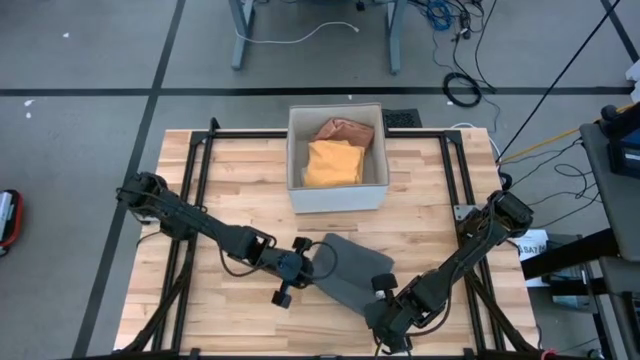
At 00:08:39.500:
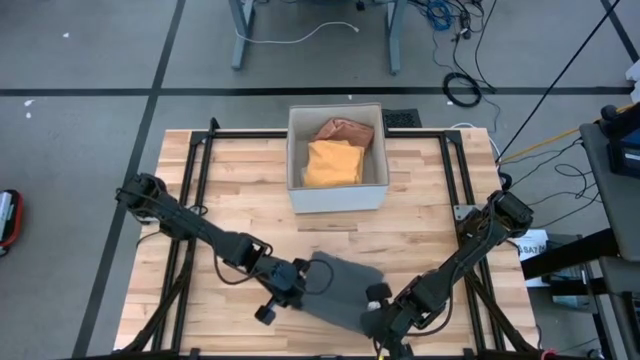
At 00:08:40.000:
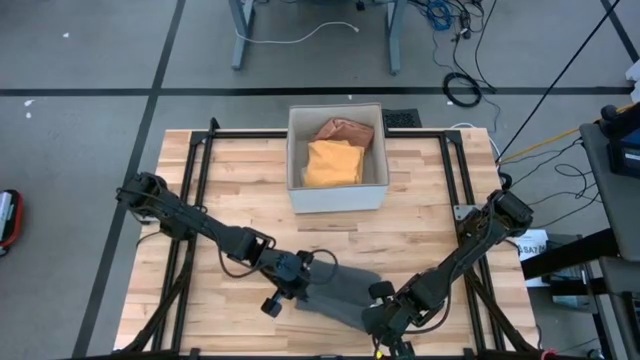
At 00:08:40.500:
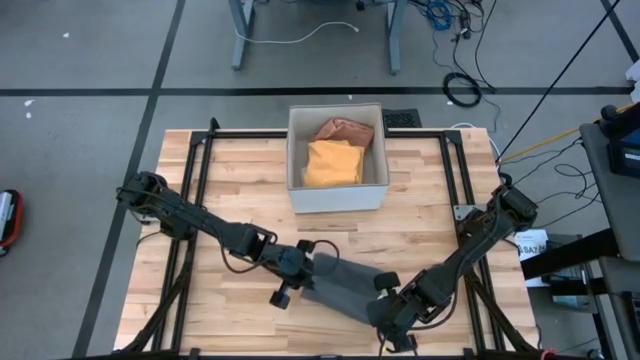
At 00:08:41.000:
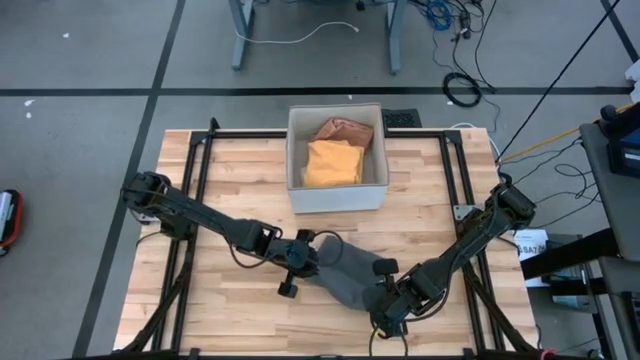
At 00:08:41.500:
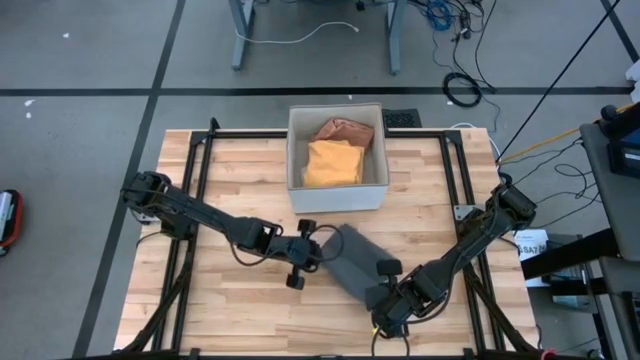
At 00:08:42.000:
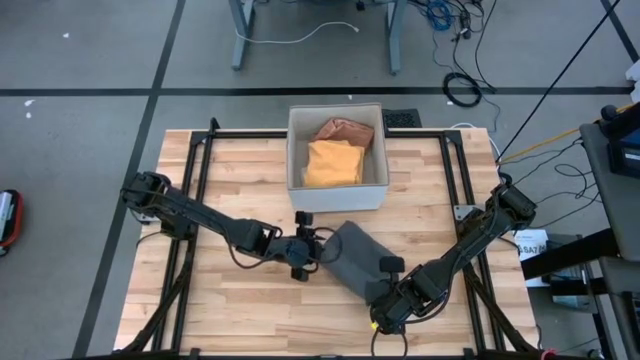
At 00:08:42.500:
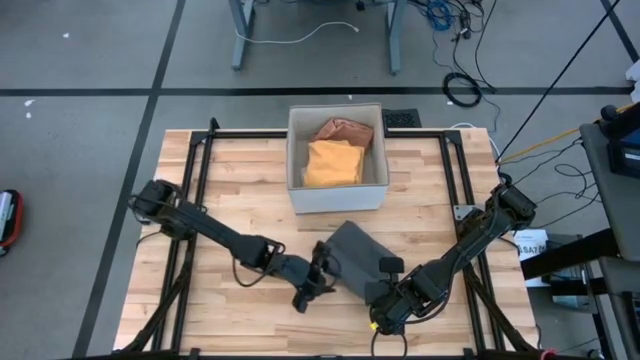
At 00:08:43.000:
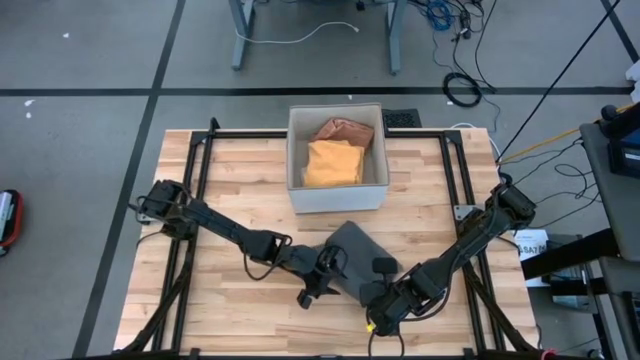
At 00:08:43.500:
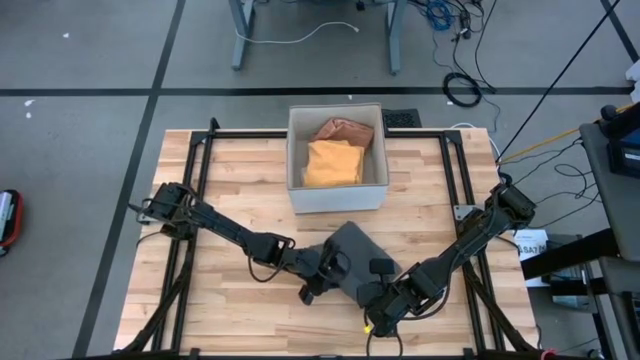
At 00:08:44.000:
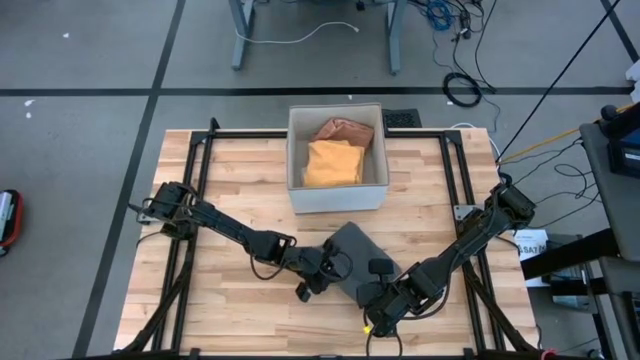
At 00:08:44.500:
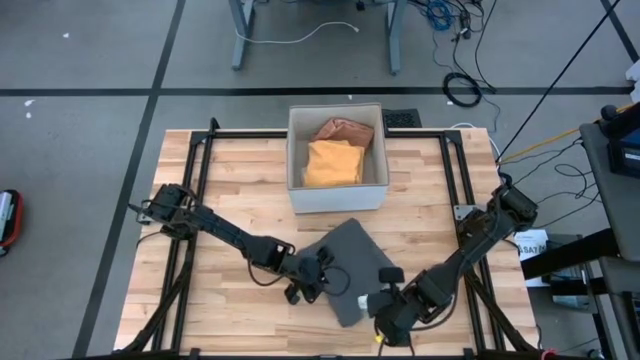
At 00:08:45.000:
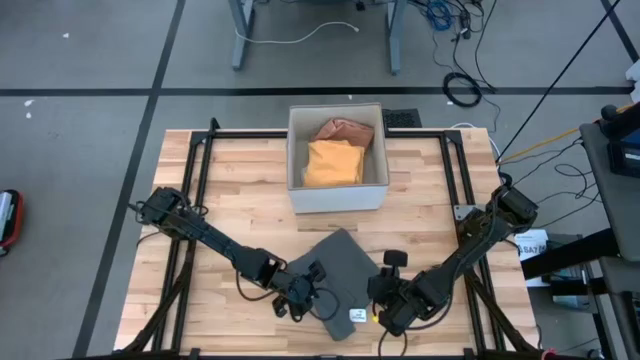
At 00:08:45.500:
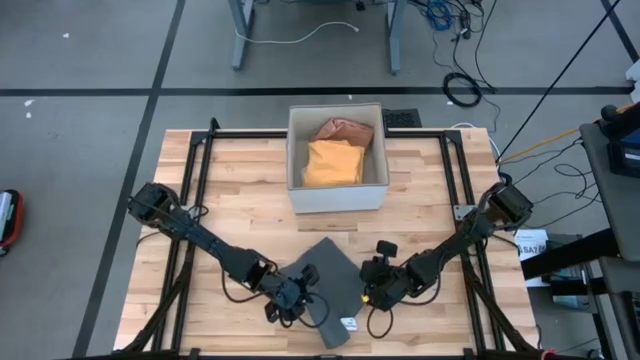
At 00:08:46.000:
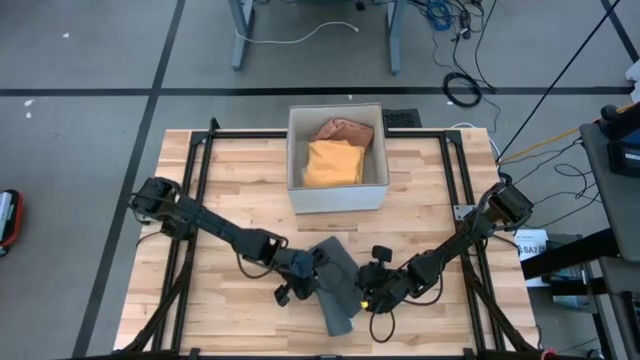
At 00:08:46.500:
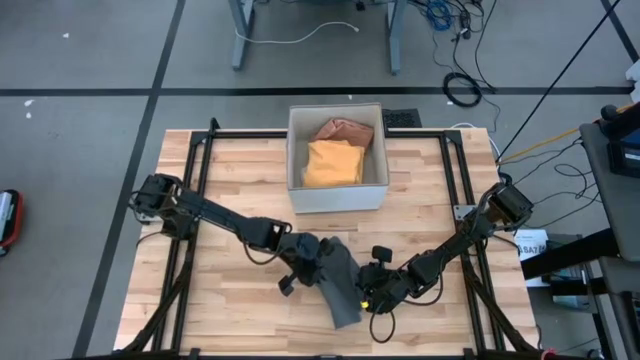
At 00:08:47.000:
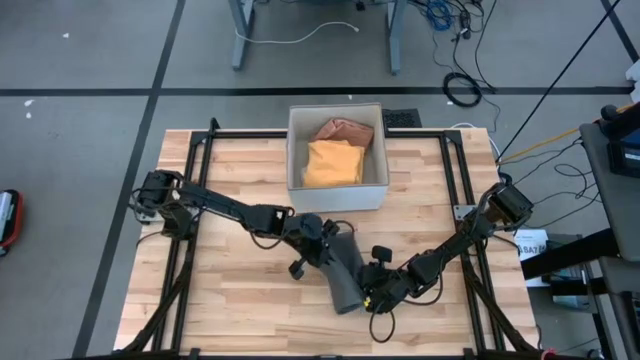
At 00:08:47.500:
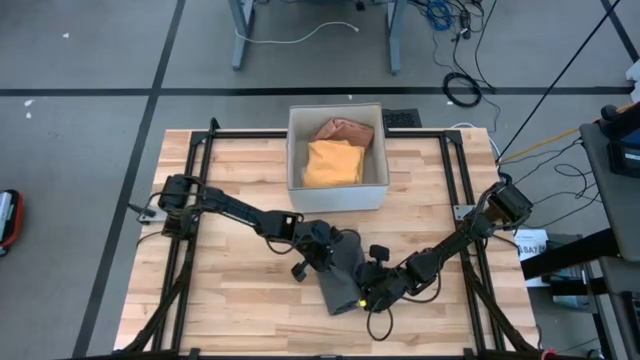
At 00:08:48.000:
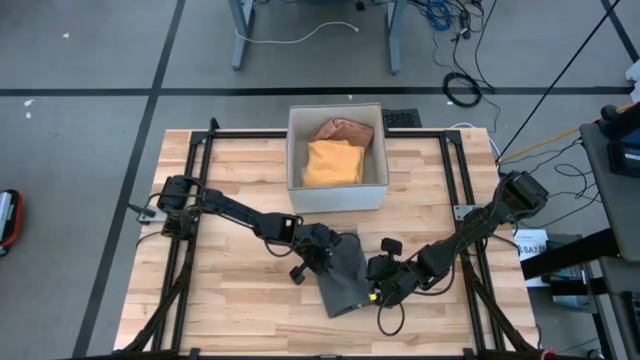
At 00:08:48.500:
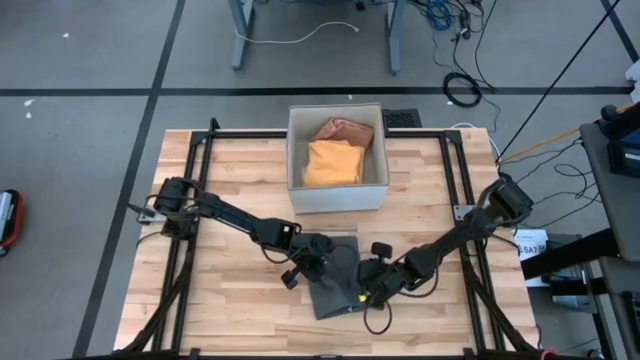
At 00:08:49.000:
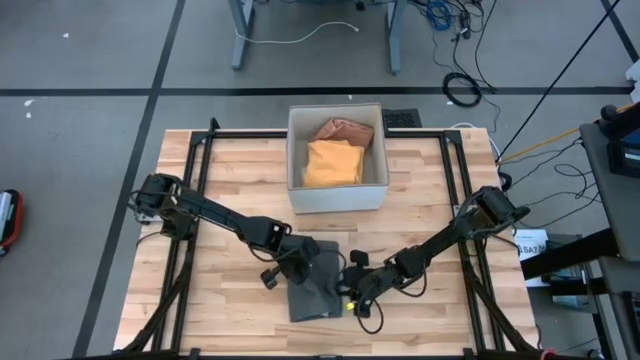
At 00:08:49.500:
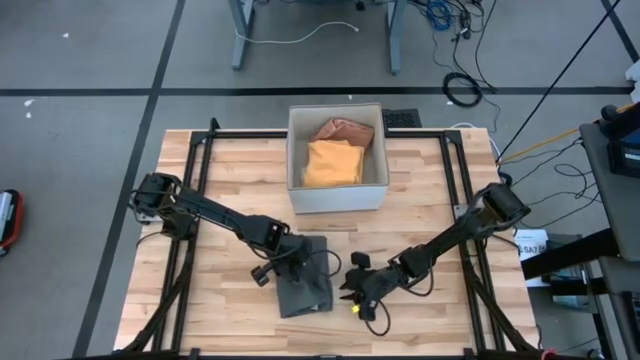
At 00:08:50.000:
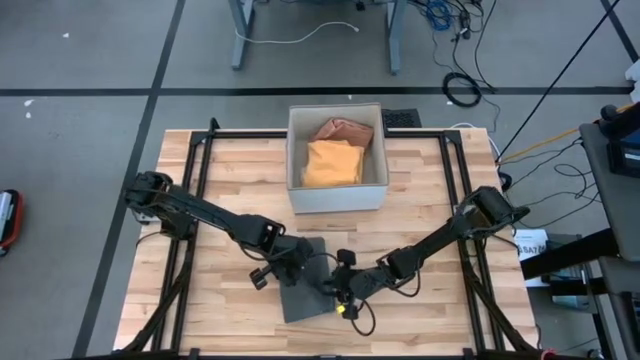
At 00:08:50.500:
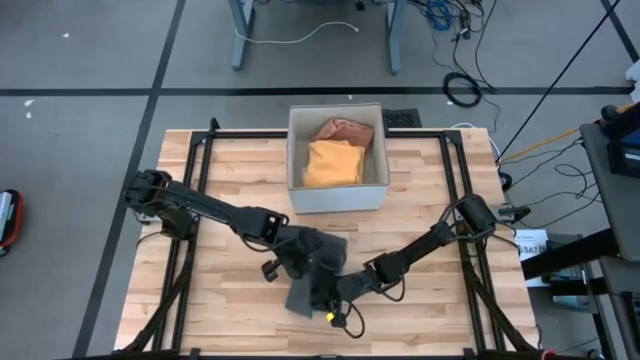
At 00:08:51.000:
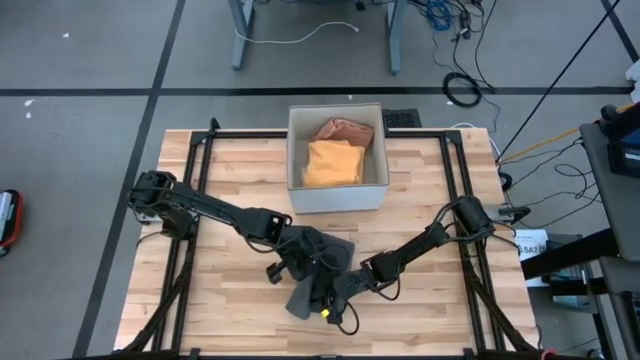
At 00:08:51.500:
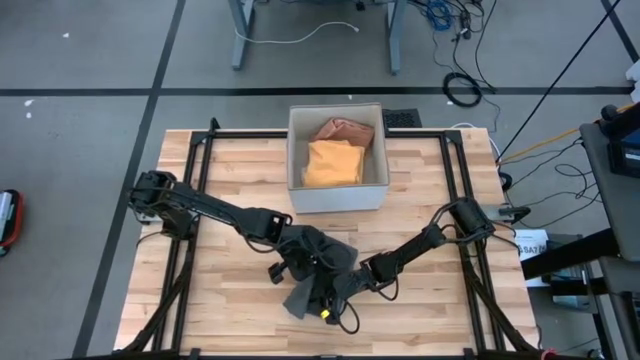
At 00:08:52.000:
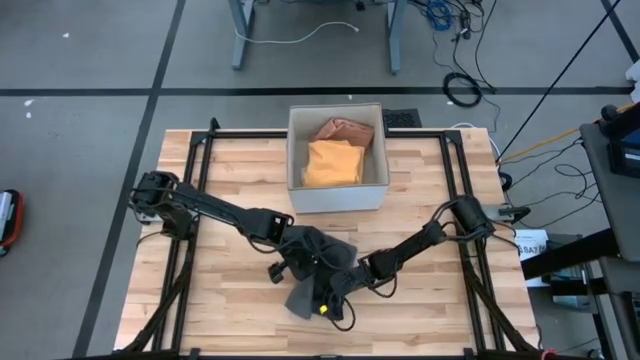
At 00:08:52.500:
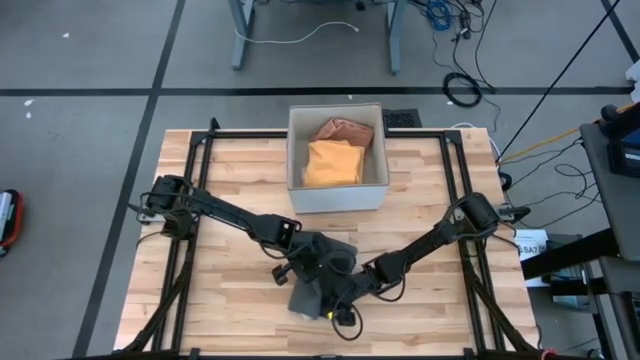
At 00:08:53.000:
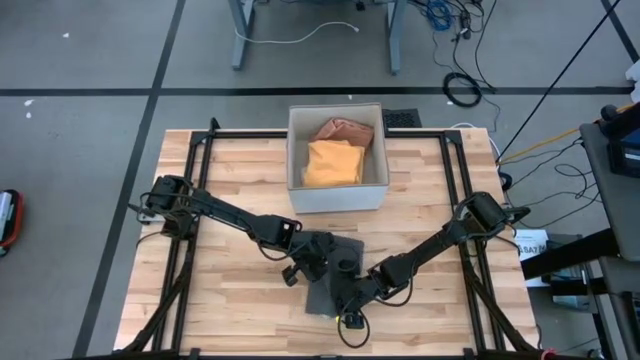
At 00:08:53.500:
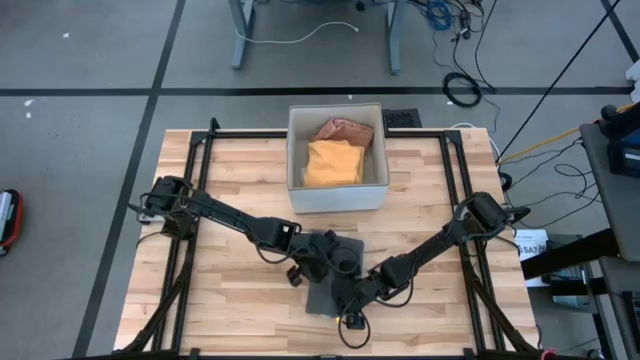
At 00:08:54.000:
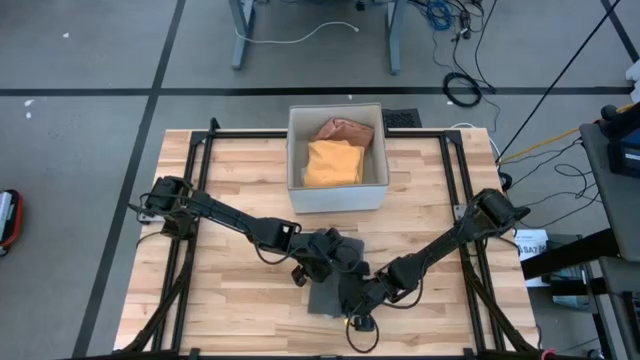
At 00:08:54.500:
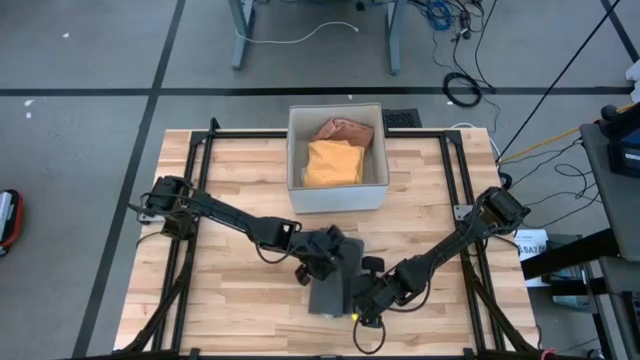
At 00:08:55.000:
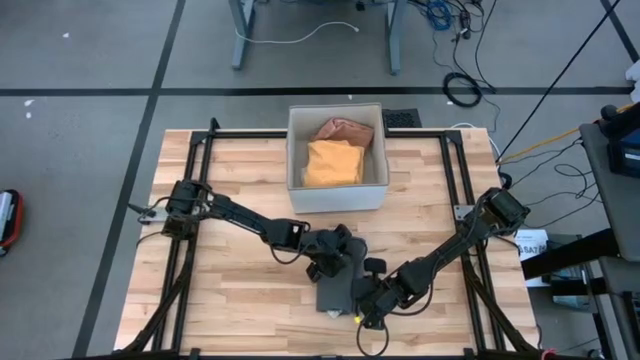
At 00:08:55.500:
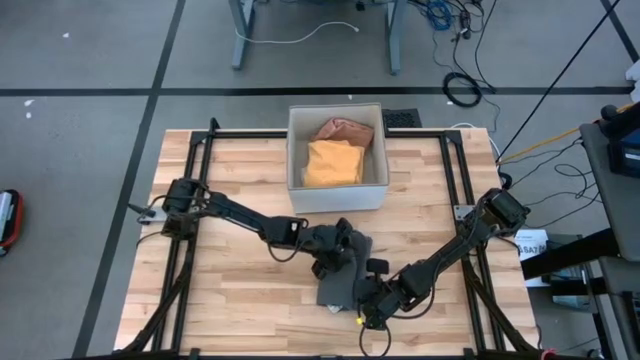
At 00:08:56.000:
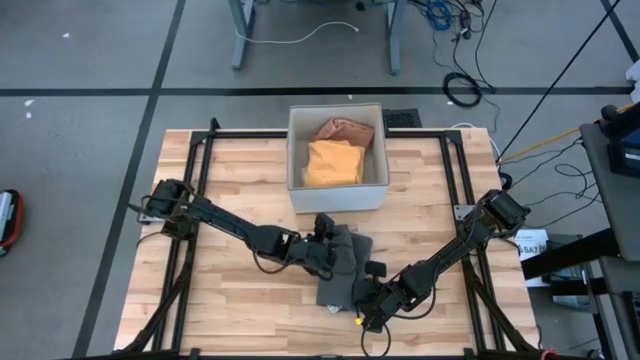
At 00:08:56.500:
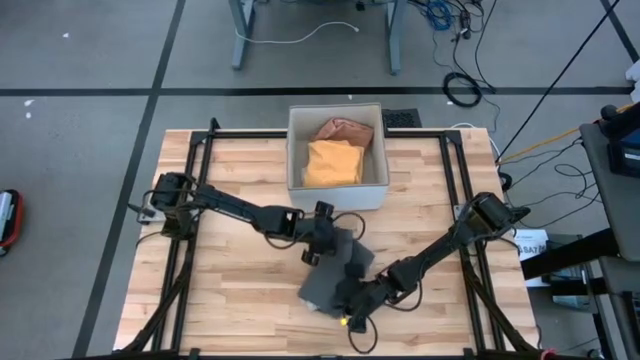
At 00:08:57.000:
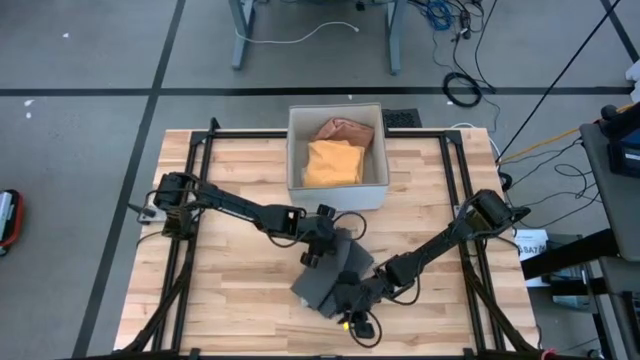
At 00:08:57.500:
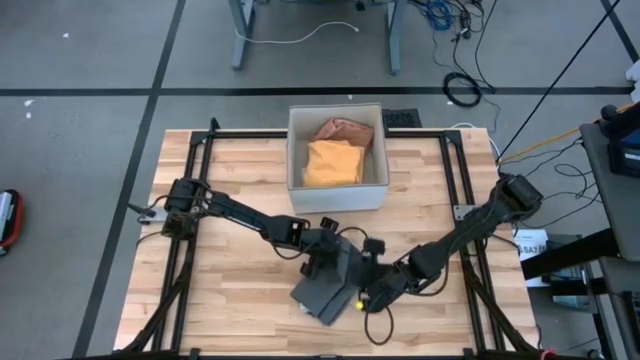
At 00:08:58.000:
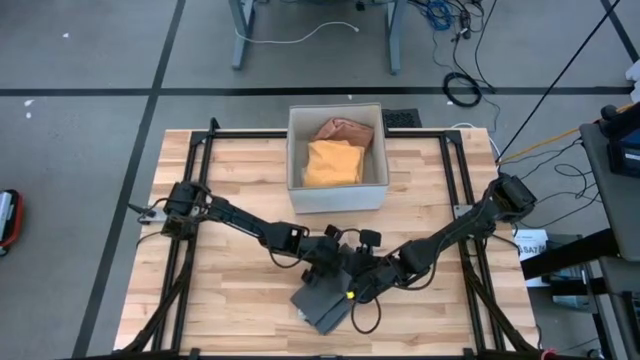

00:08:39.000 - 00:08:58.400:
Task: Fold towel
Fold the gray towel
